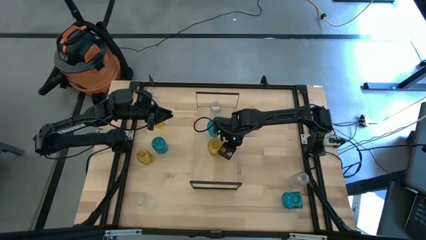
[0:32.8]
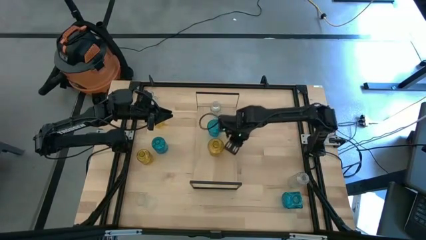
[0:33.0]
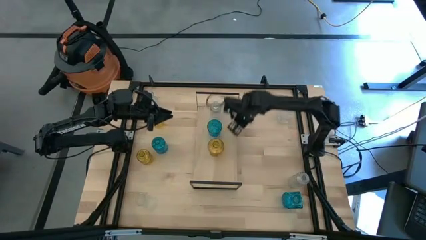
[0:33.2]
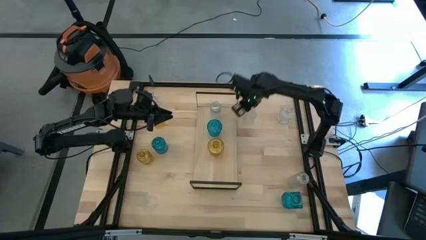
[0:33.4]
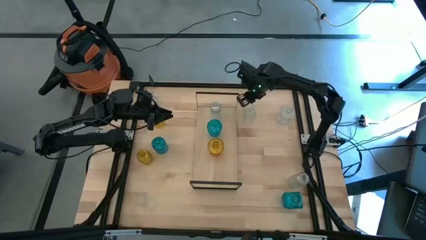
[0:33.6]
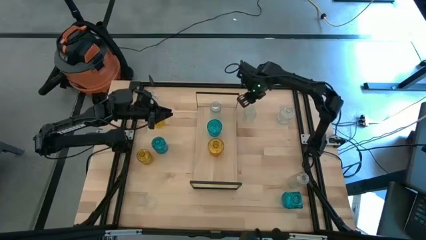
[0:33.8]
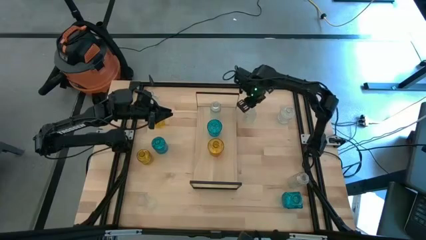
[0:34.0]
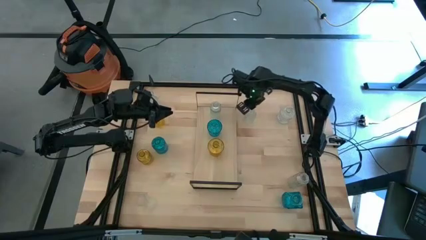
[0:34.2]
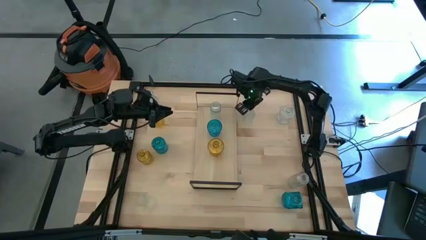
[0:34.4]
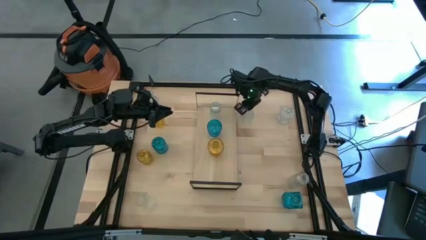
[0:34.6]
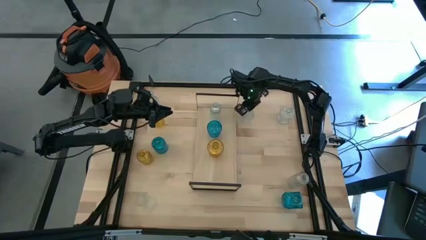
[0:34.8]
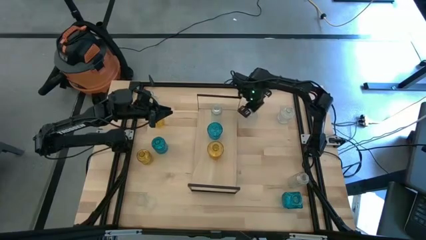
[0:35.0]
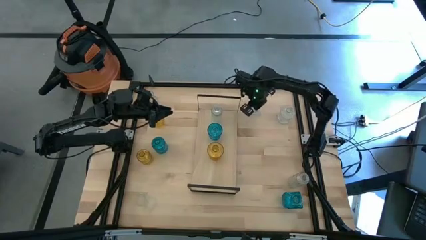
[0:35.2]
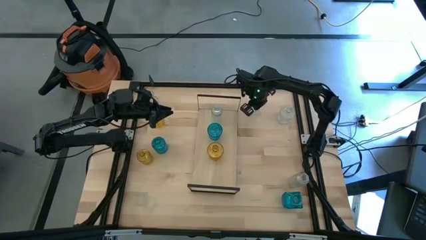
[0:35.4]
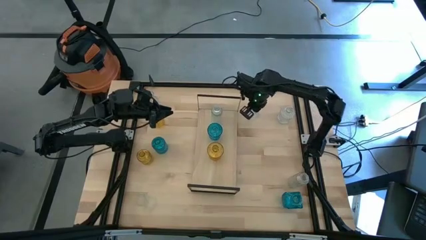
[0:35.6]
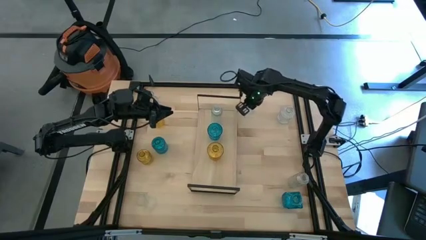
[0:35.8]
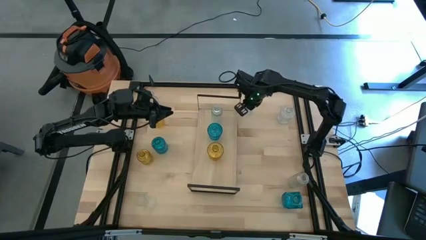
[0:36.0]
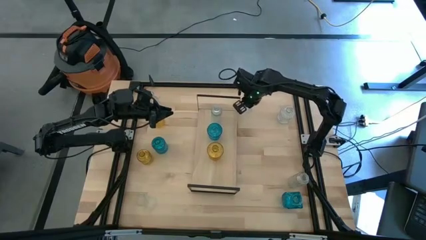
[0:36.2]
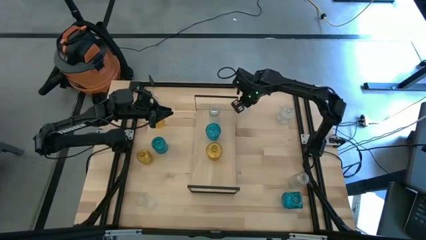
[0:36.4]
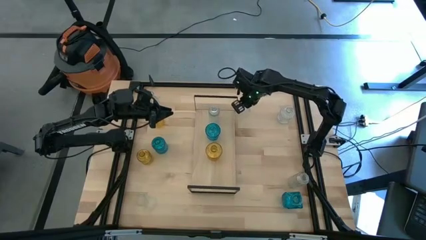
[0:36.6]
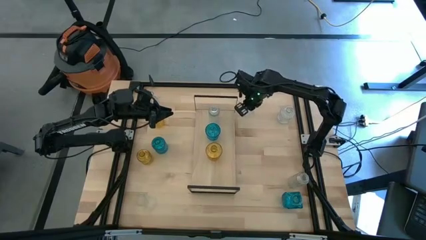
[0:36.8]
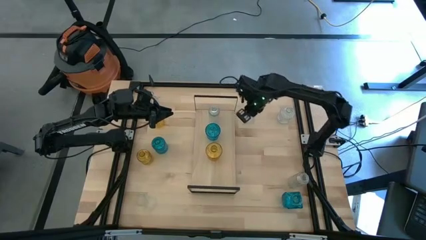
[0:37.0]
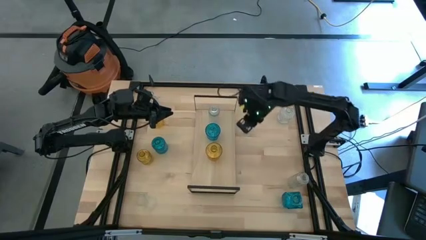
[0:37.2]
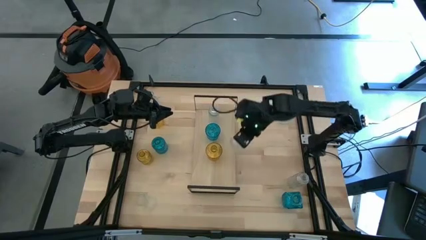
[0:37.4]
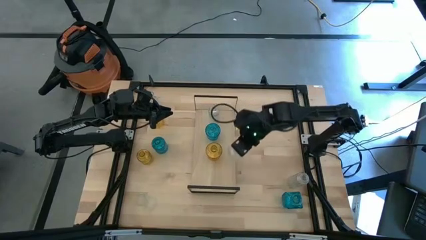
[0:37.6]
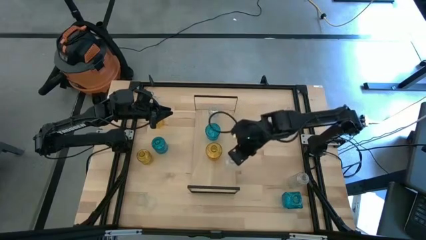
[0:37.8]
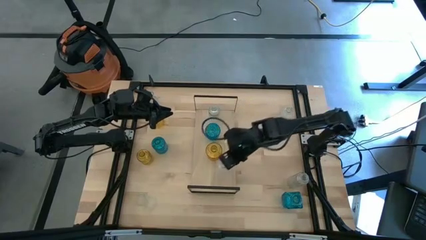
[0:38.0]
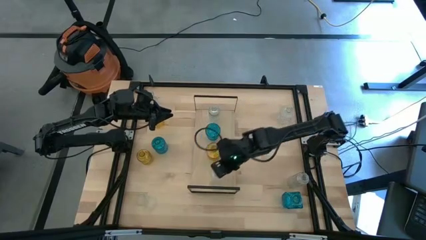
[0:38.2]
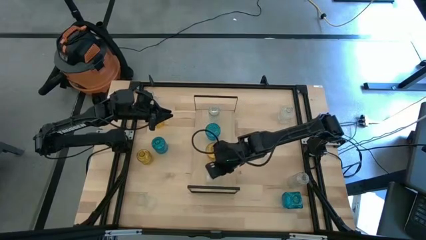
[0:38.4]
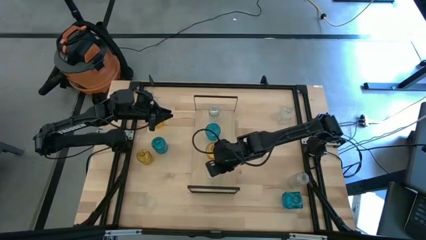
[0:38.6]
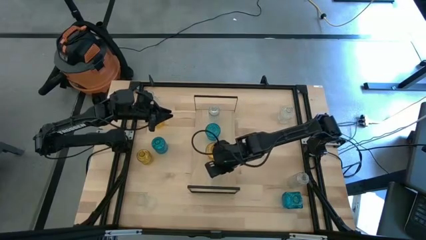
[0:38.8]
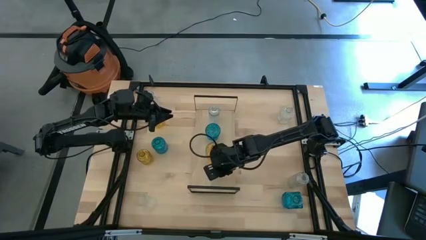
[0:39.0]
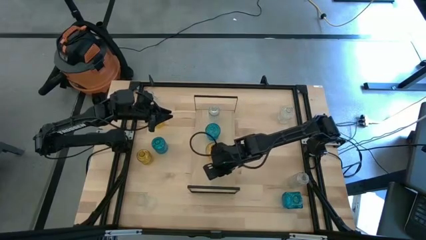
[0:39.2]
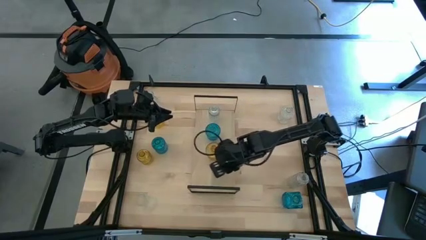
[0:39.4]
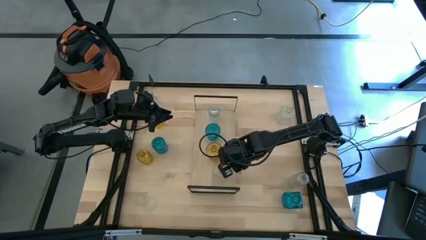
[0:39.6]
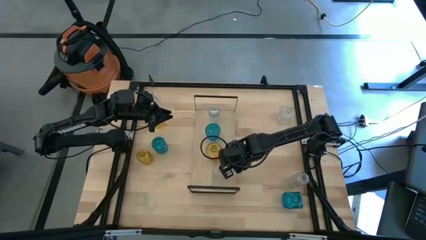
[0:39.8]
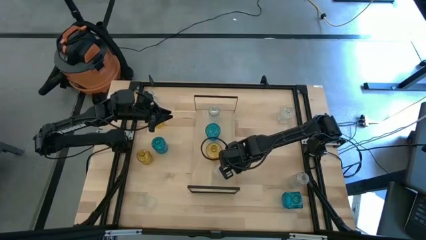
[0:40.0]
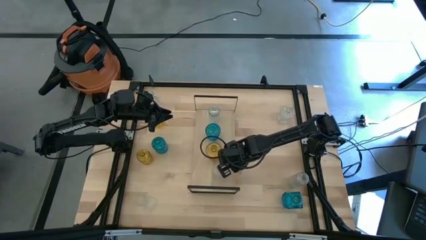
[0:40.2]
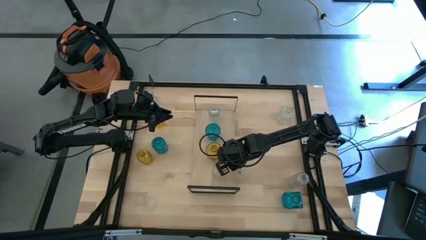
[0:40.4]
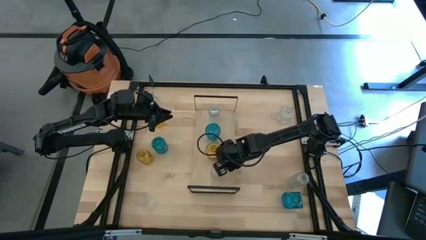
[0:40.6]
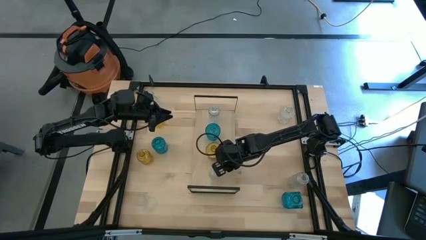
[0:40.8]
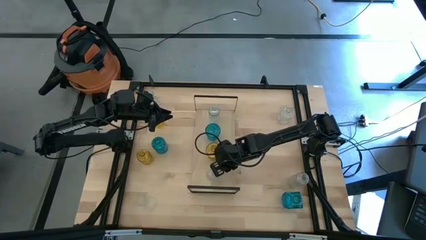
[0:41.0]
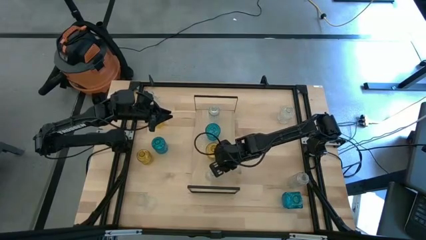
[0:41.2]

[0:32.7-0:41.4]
Task: sort vases onto shelf
Put the transparent vase on the shelf

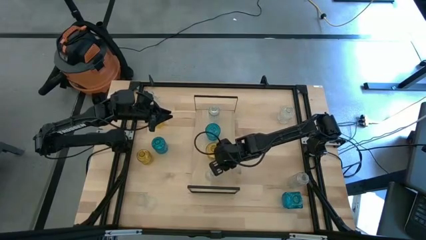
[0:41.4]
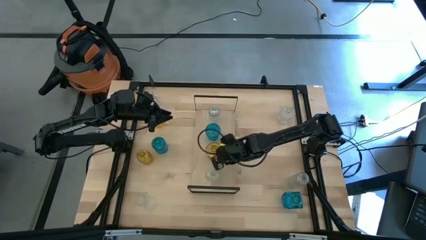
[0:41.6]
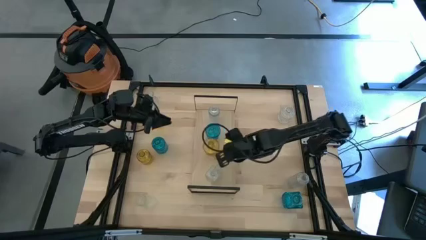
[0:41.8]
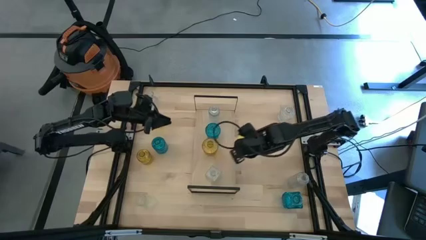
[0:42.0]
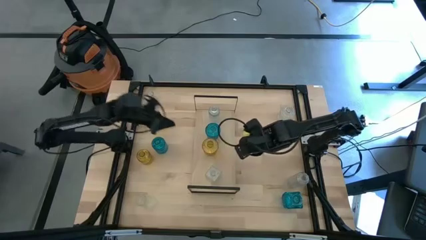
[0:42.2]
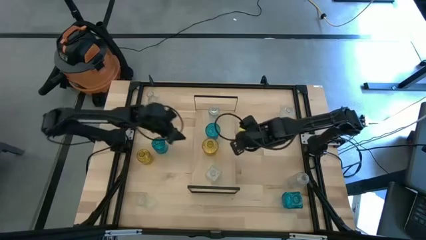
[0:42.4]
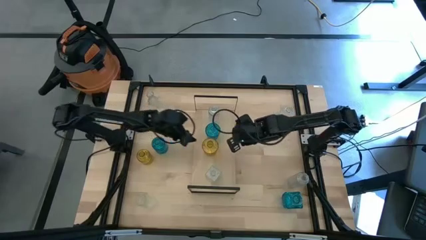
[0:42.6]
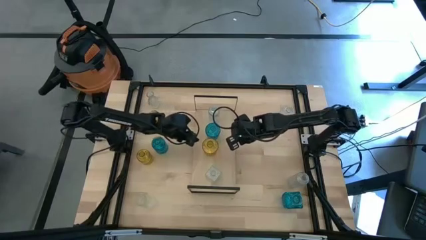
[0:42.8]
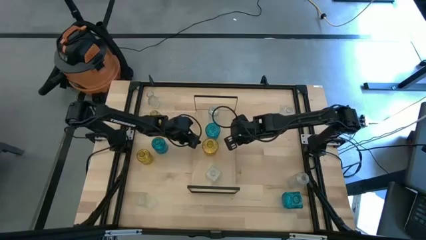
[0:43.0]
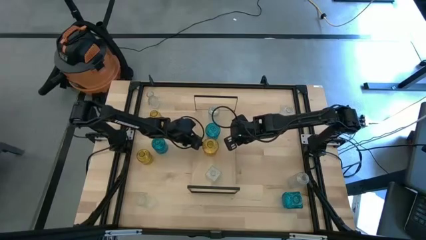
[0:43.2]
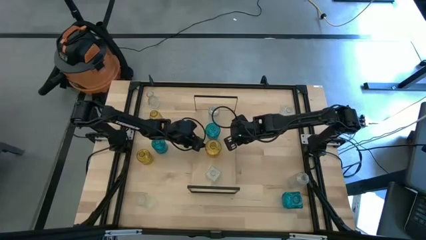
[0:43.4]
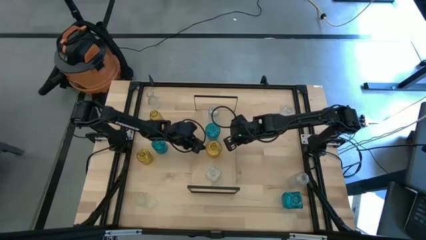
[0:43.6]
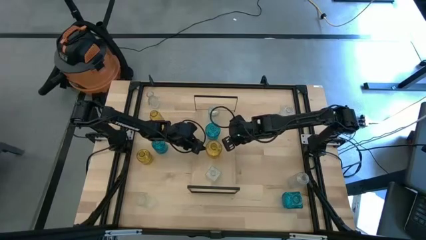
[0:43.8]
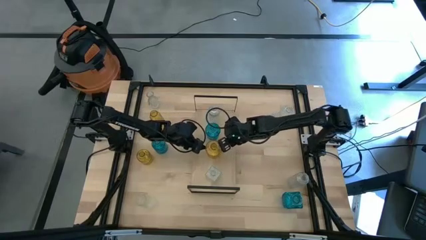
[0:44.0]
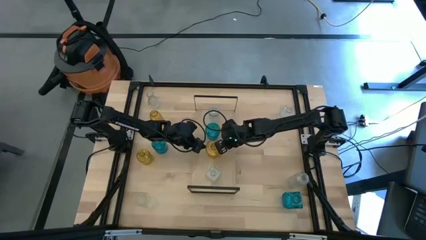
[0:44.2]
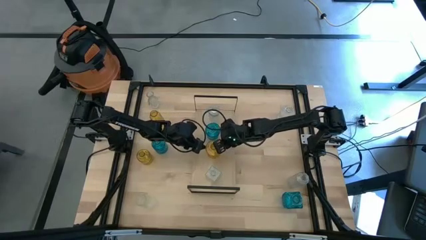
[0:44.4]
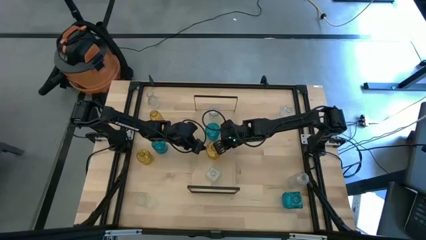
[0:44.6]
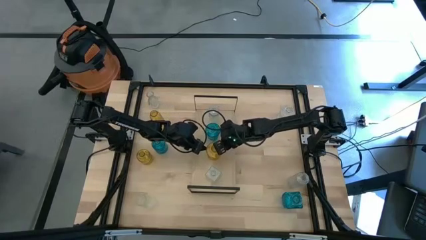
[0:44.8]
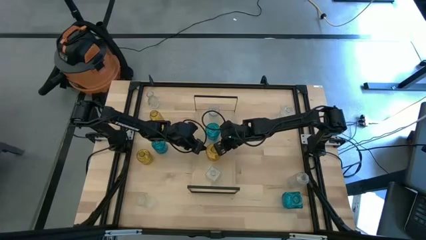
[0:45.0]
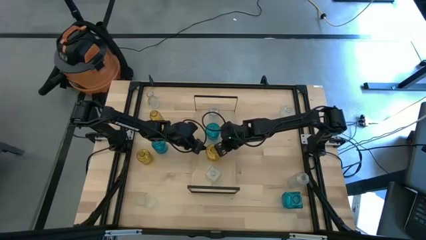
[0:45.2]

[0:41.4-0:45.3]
Adjust the yellow vase on the shelf
